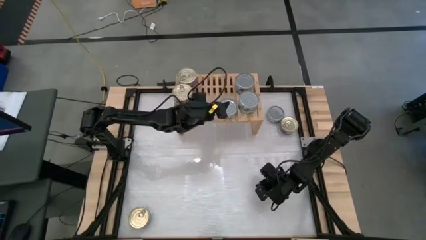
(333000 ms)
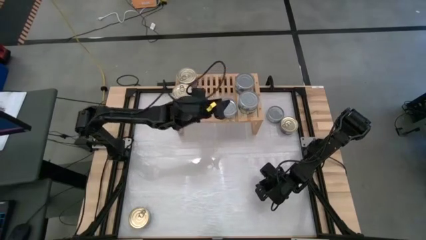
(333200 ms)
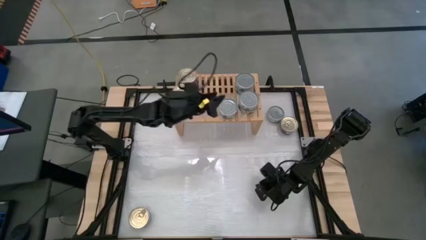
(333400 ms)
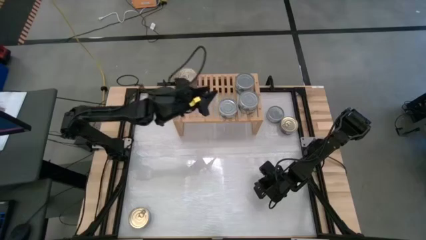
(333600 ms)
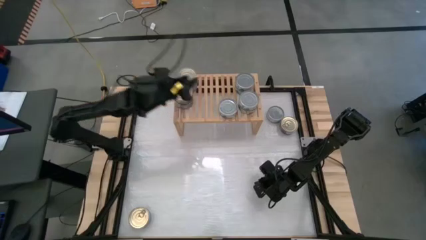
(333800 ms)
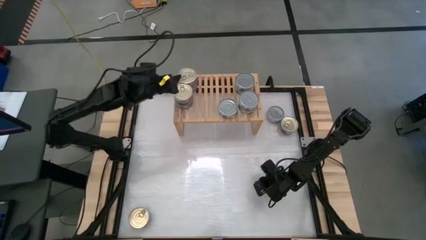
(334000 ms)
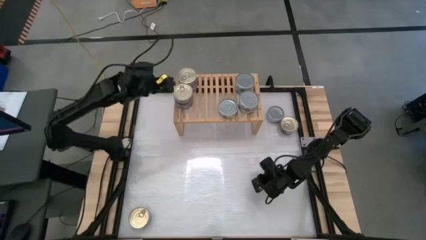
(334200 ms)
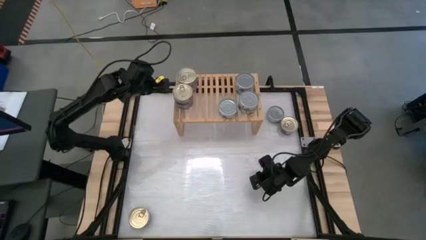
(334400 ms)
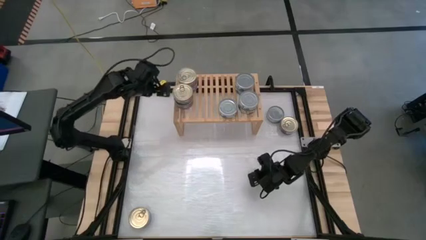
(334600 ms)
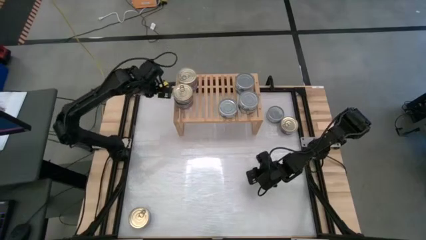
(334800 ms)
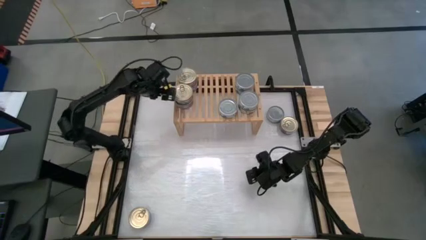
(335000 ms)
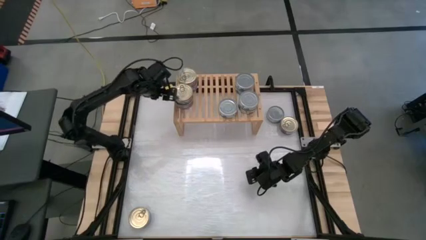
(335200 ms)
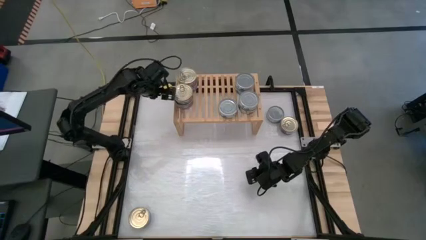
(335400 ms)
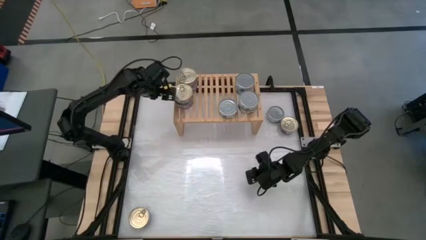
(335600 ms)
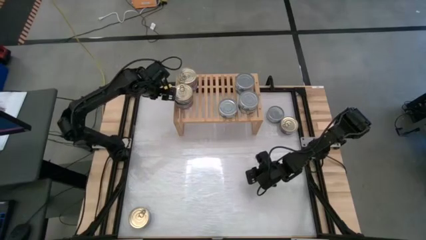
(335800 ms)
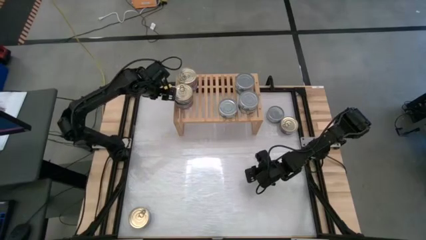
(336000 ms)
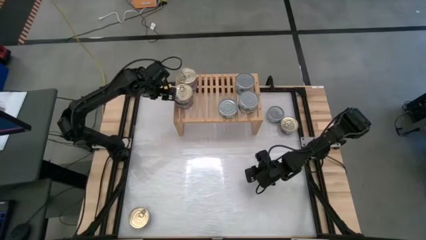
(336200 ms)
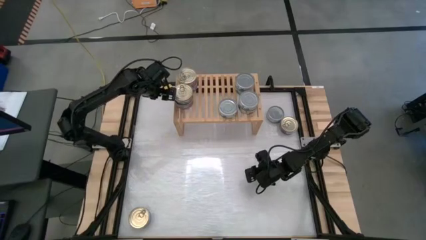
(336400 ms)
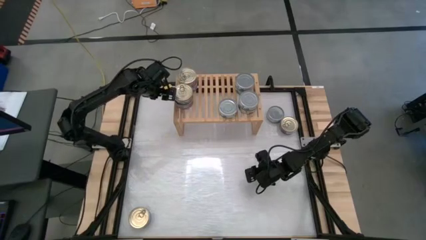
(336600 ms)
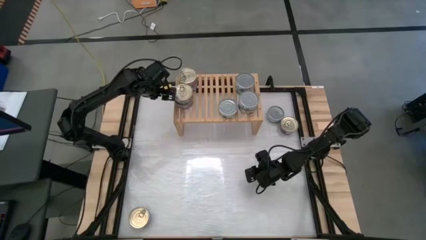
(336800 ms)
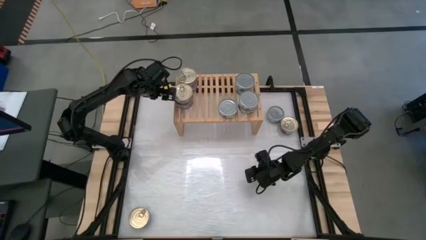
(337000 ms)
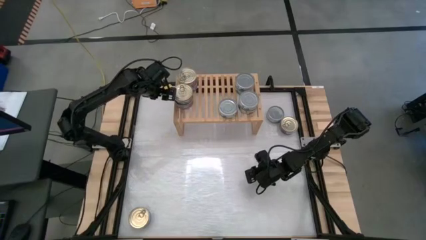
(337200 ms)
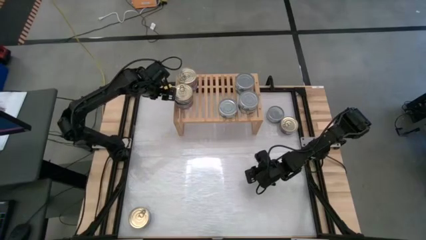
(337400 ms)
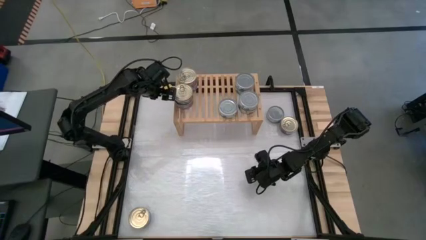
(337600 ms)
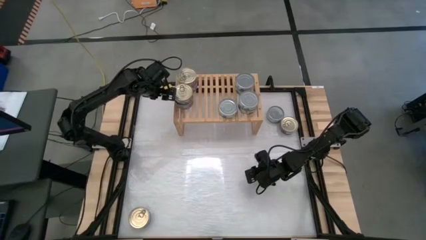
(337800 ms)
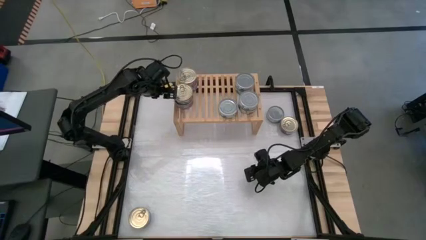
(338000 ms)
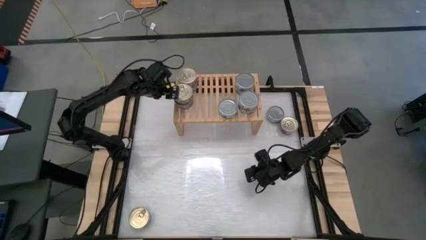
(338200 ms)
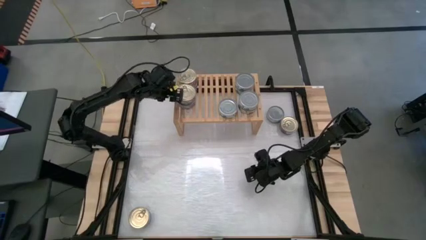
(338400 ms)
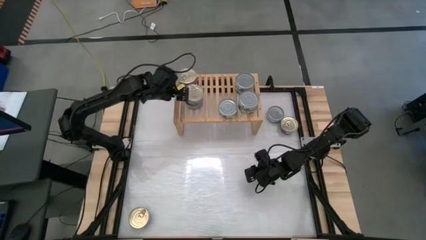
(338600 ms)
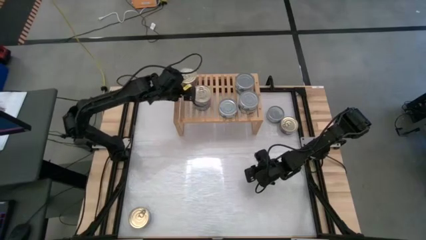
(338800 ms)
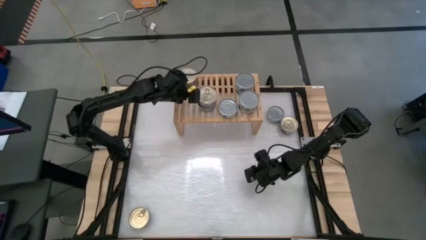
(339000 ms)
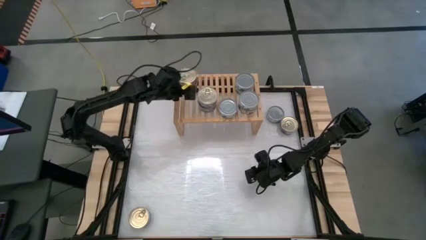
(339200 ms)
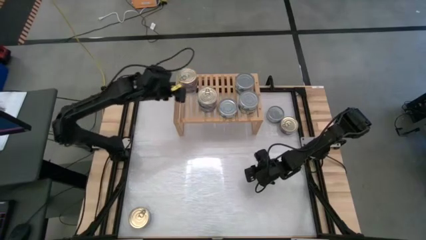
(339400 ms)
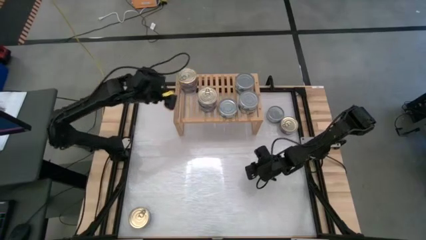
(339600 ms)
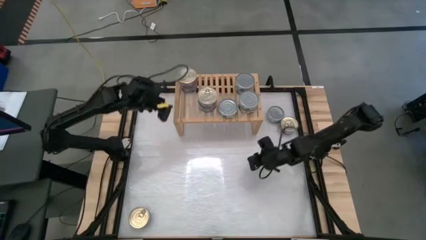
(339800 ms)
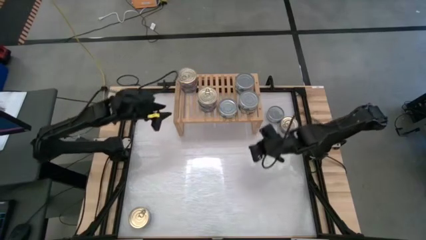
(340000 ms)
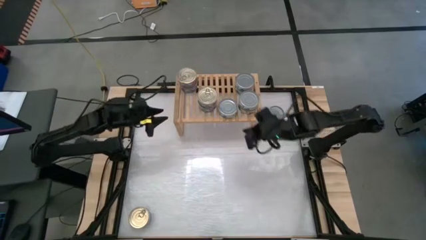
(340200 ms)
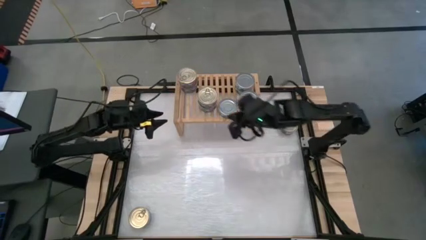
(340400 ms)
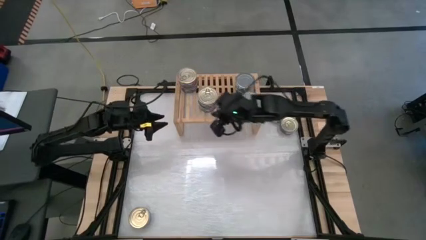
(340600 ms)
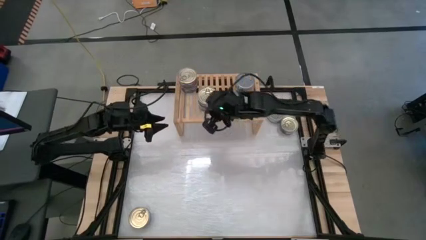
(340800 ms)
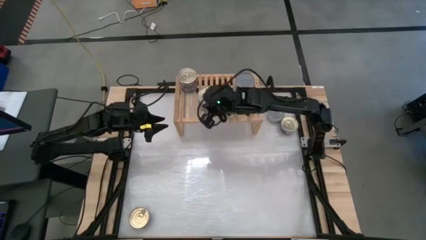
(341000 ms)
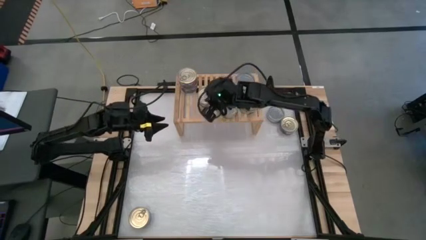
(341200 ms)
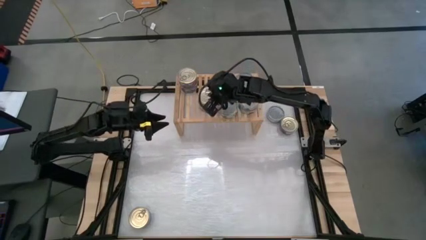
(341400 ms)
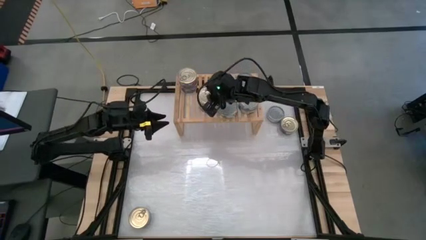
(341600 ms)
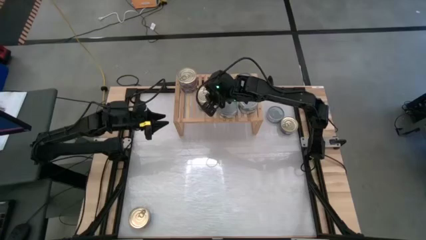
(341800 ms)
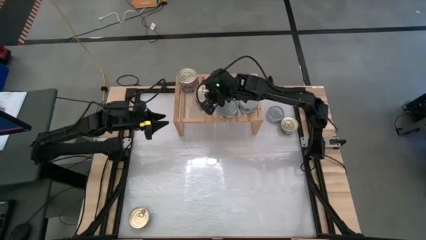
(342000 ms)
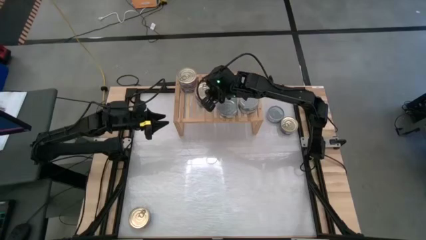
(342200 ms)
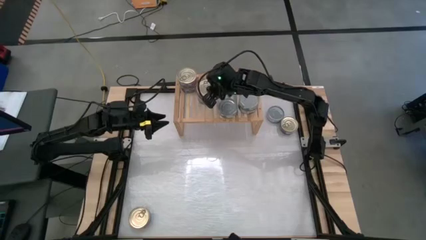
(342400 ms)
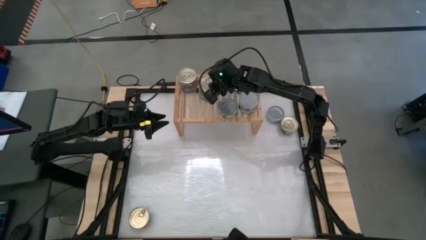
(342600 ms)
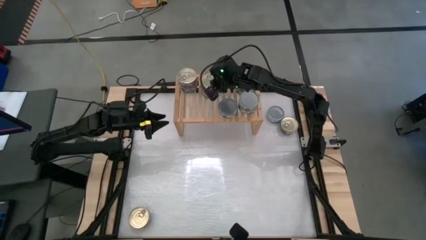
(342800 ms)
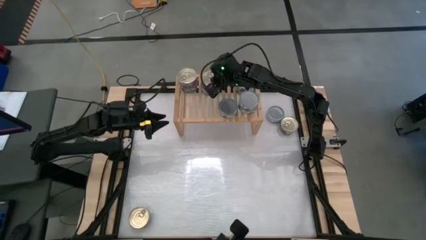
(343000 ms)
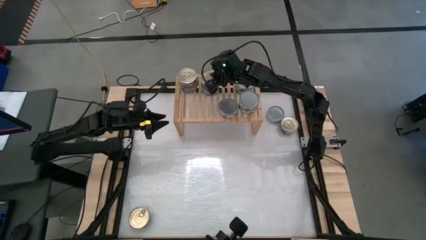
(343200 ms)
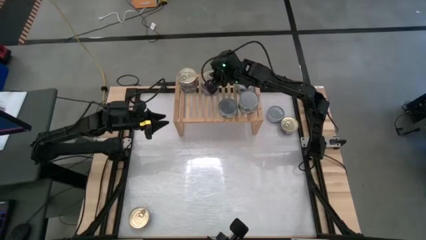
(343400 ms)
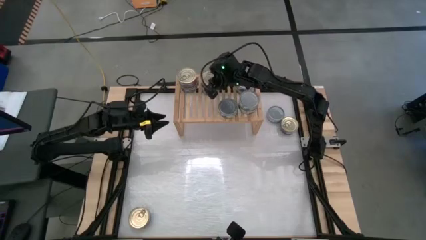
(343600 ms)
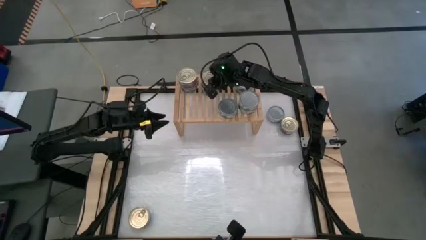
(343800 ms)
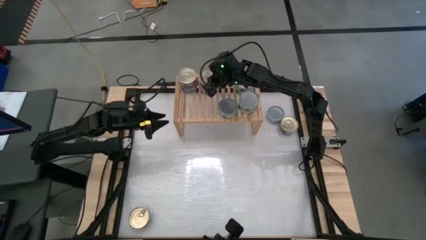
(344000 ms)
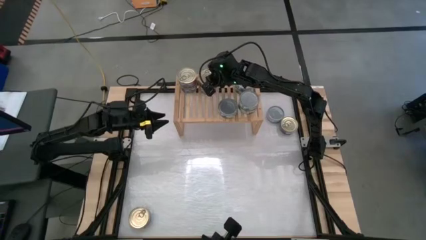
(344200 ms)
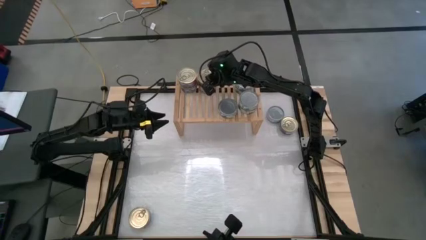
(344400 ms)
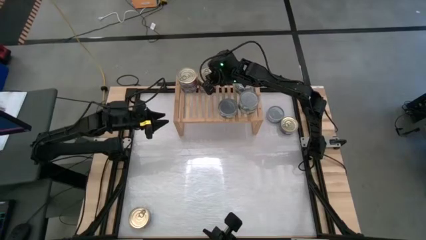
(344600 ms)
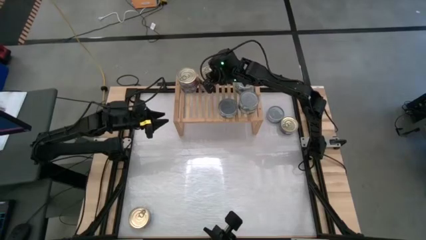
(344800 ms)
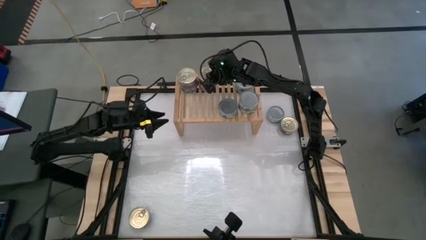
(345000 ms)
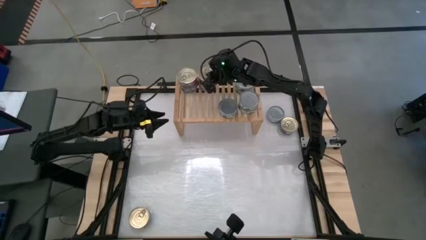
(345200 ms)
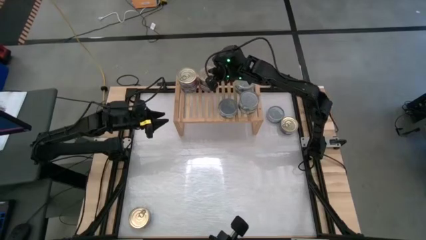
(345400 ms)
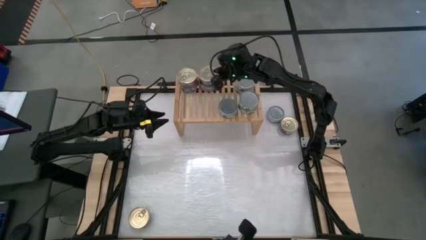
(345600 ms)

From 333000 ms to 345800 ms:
Task: Stack canned seafood by type on shelf
Adjust the blue-pink stacked tuna cans on the shelf

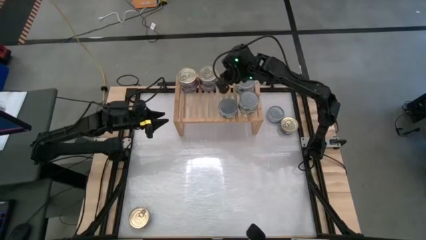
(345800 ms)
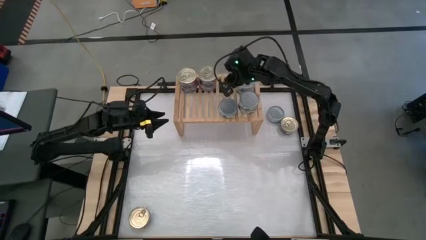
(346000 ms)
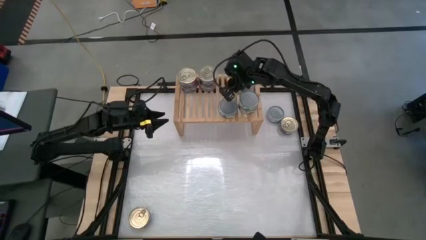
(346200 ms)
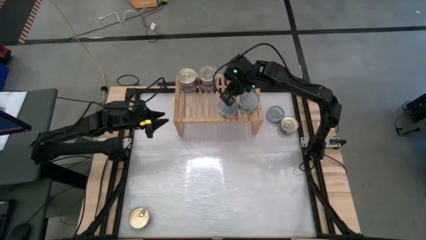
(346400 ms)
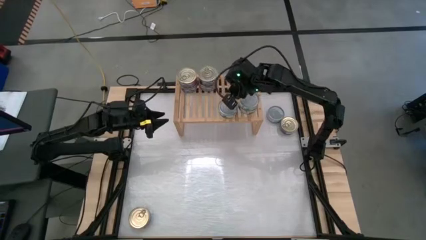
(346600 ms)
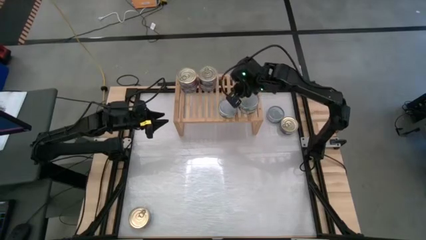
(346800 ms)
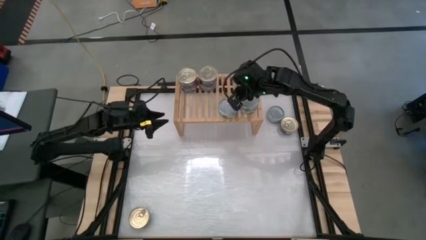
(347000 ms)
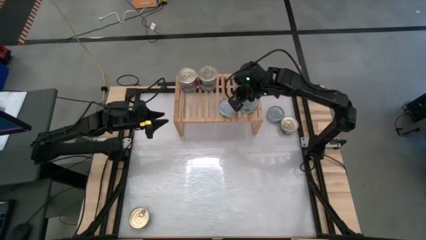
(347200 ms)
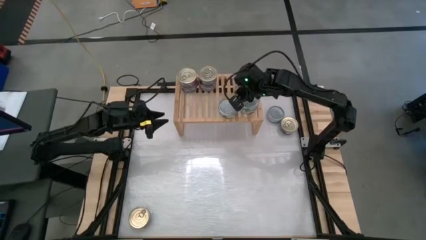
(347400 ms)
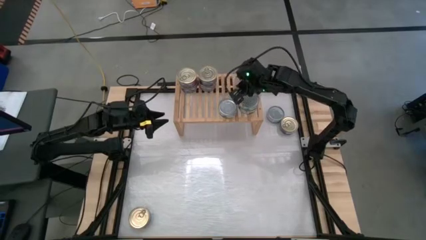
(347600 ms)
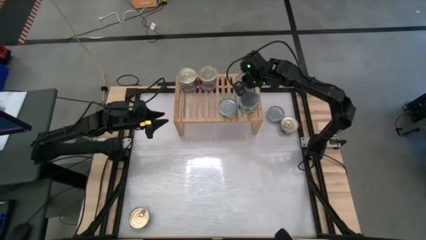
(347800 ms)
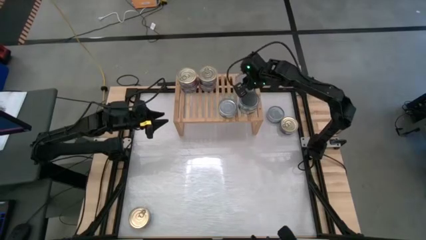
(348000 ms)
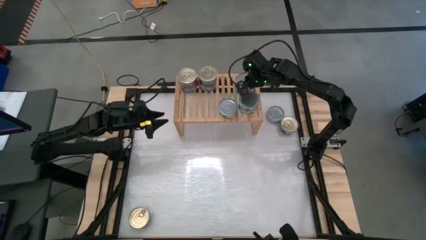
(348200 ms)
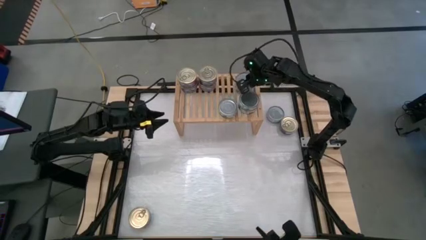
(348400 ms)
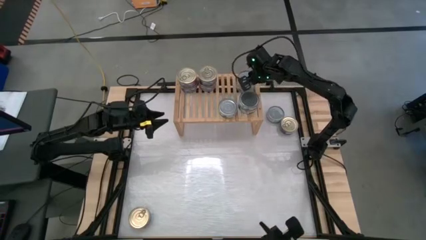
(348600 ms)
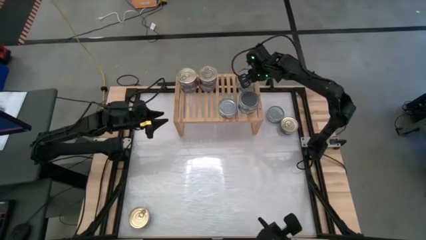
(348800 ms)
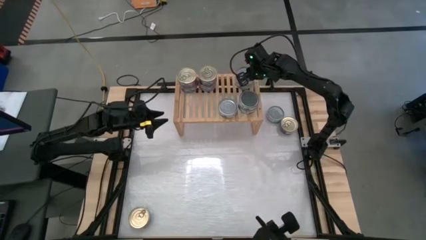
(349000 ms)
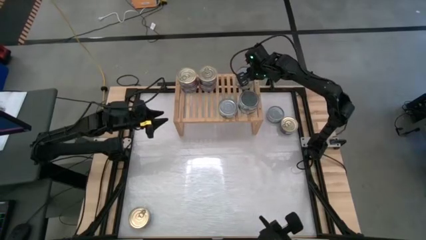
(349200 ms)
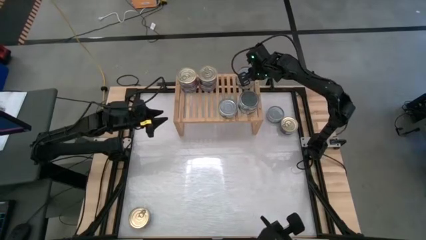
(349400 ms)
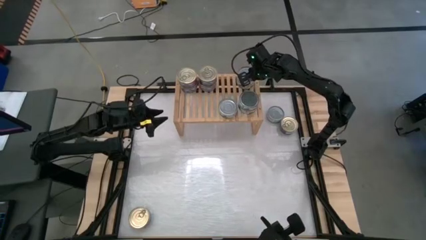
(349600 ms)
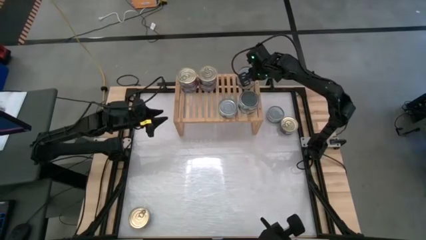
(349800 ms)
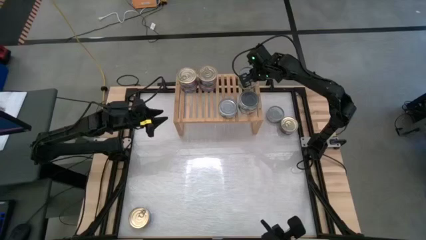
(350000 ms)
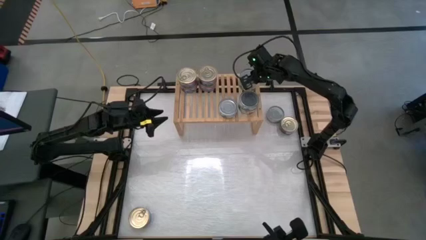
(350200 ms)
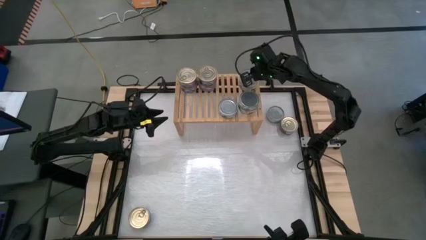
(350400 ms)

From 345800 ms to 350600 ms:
Adjust the green tuna cans
